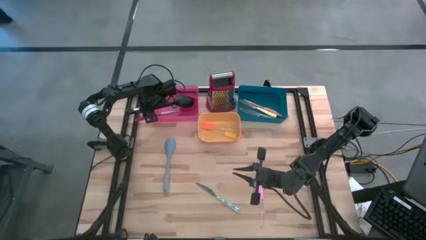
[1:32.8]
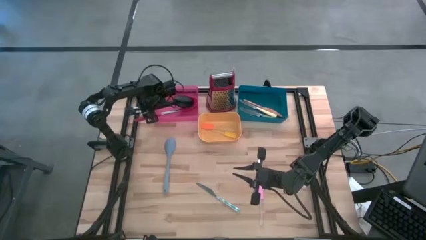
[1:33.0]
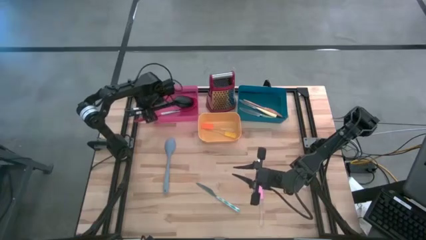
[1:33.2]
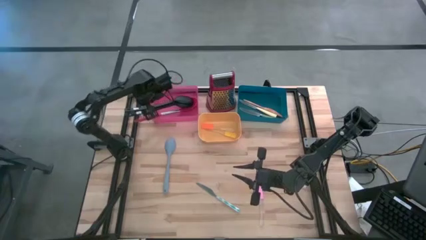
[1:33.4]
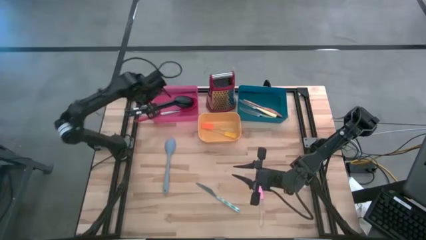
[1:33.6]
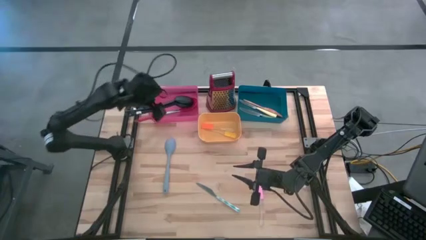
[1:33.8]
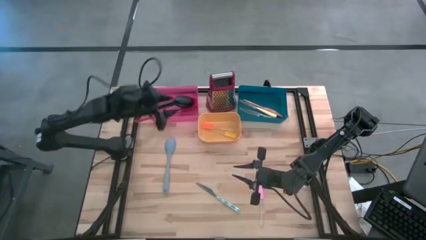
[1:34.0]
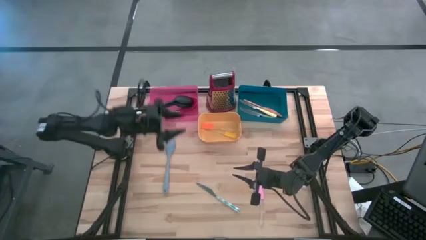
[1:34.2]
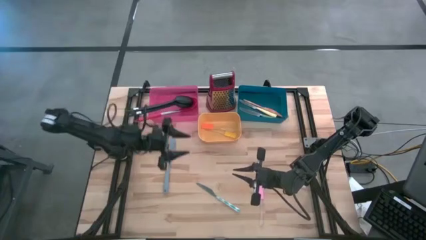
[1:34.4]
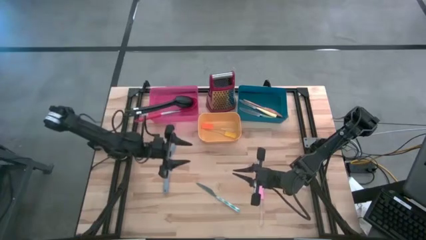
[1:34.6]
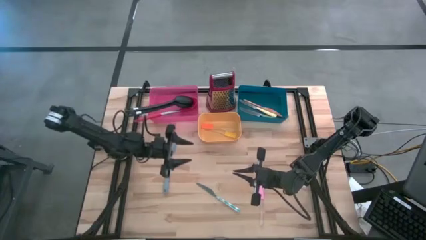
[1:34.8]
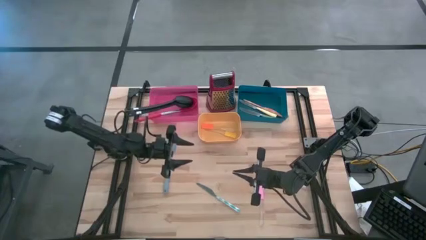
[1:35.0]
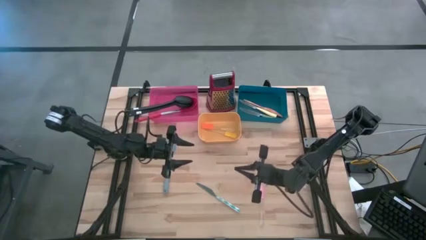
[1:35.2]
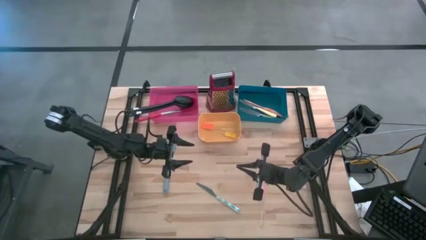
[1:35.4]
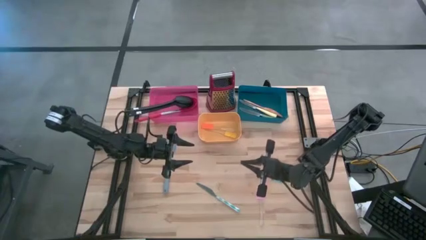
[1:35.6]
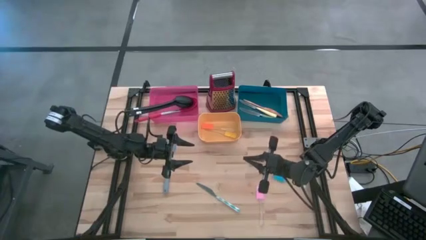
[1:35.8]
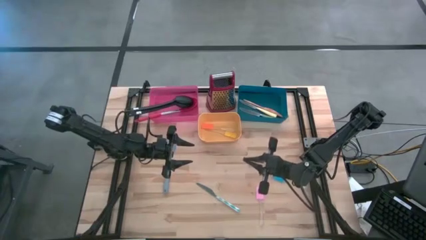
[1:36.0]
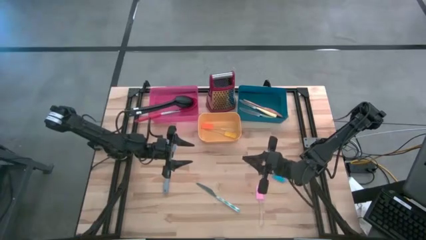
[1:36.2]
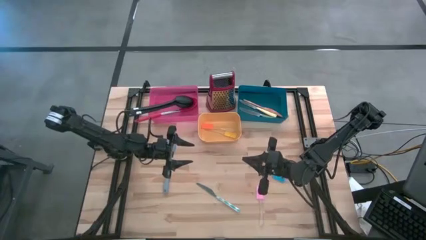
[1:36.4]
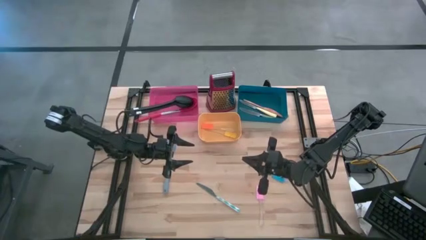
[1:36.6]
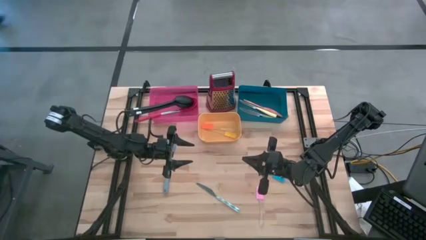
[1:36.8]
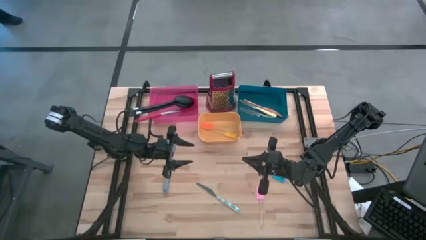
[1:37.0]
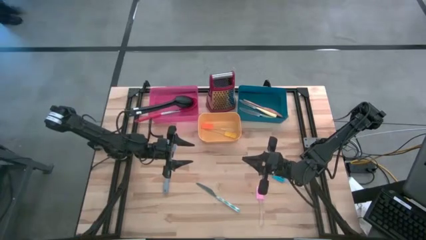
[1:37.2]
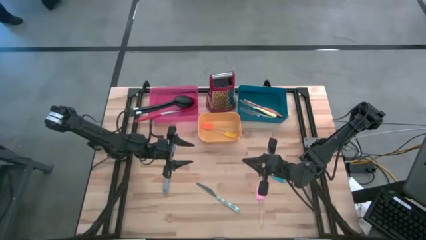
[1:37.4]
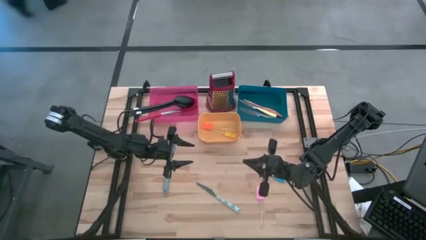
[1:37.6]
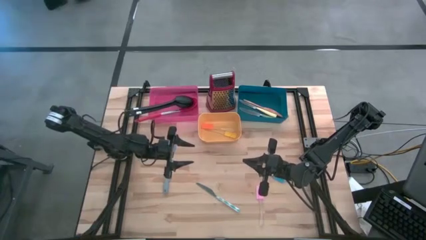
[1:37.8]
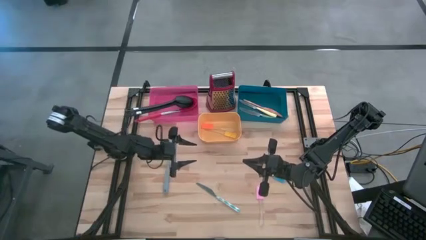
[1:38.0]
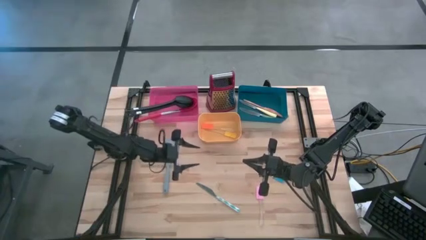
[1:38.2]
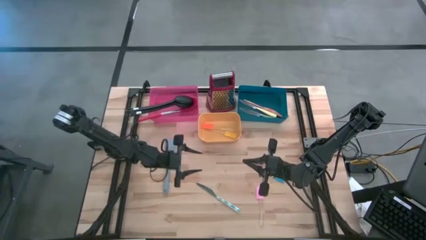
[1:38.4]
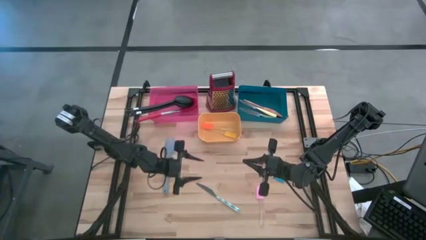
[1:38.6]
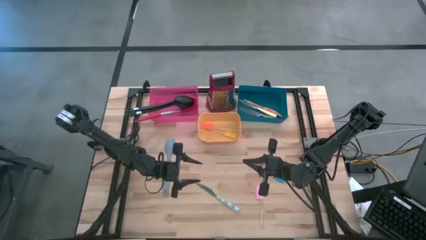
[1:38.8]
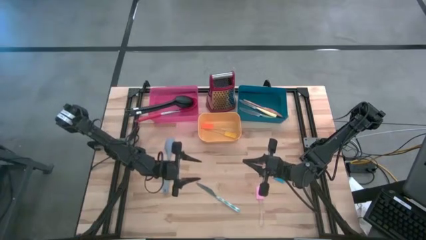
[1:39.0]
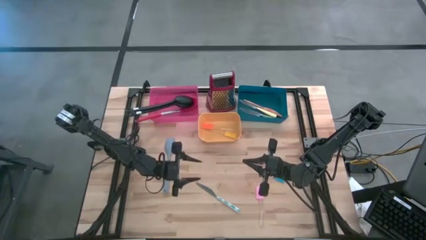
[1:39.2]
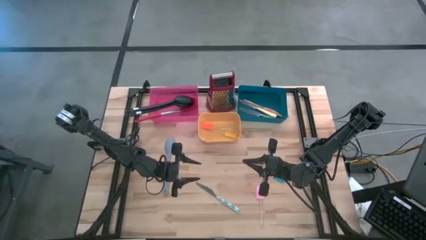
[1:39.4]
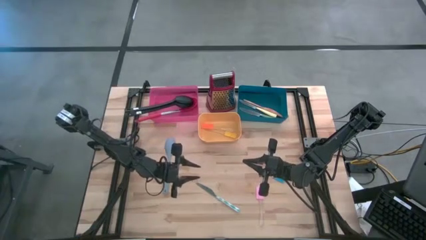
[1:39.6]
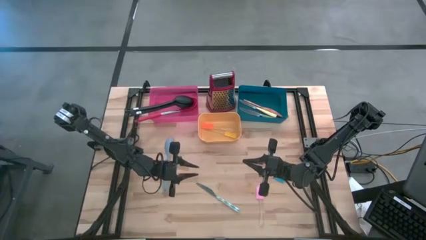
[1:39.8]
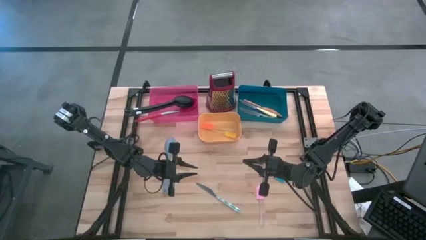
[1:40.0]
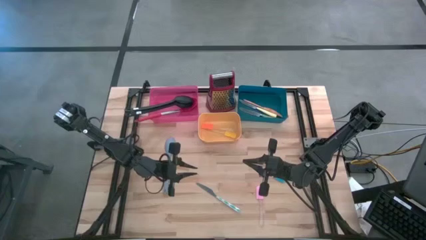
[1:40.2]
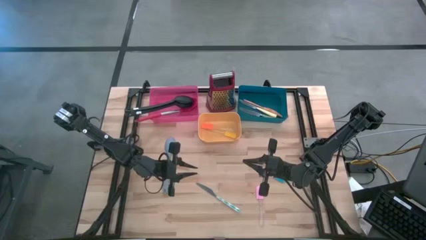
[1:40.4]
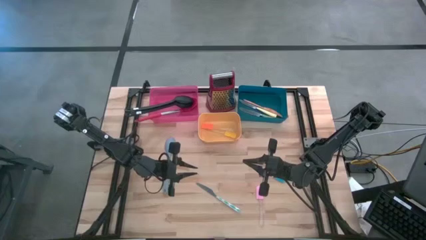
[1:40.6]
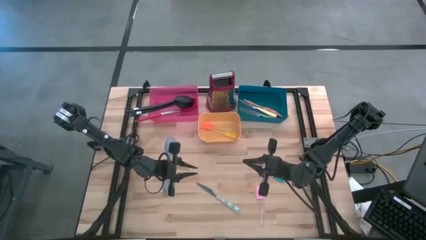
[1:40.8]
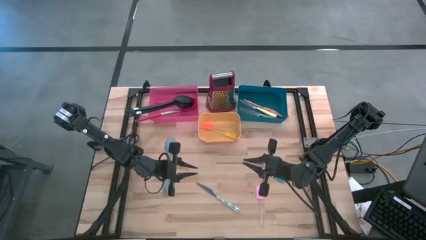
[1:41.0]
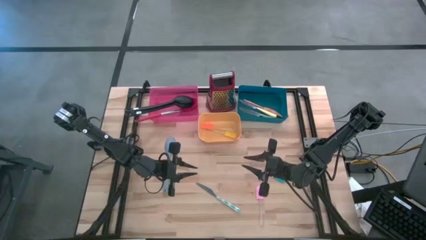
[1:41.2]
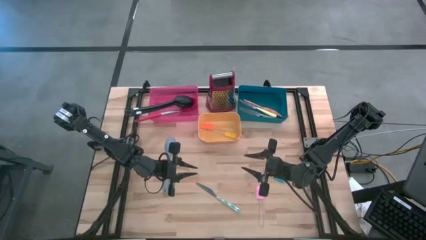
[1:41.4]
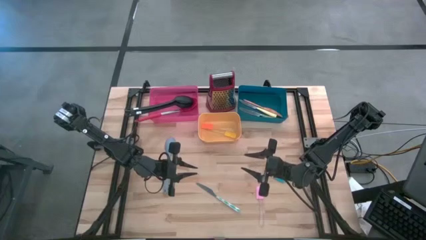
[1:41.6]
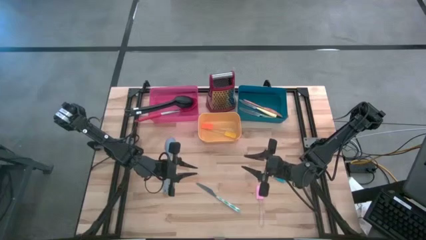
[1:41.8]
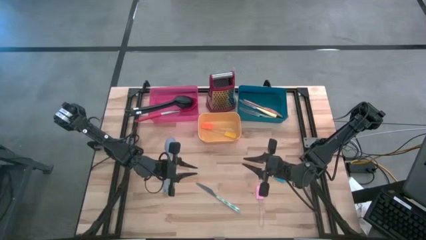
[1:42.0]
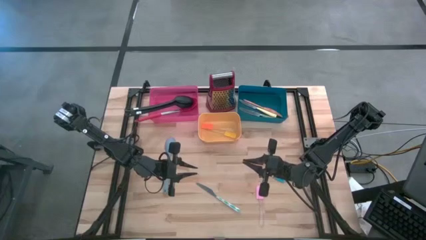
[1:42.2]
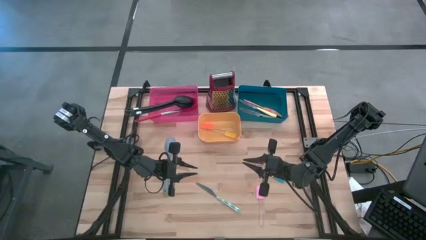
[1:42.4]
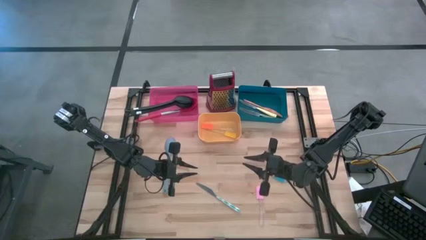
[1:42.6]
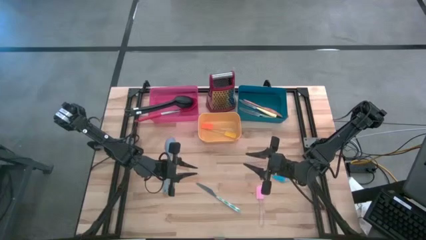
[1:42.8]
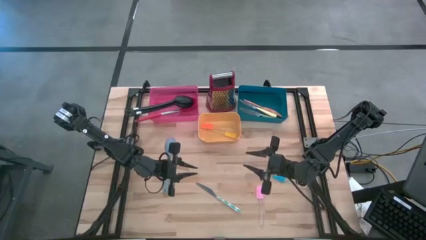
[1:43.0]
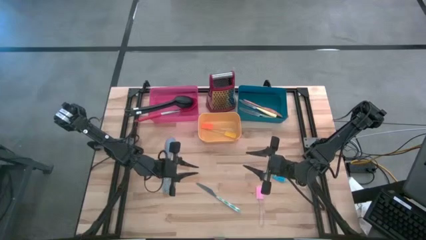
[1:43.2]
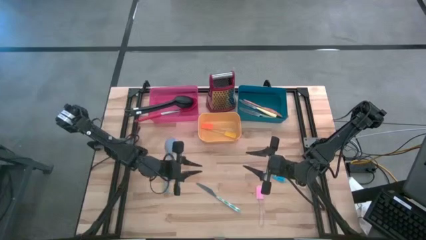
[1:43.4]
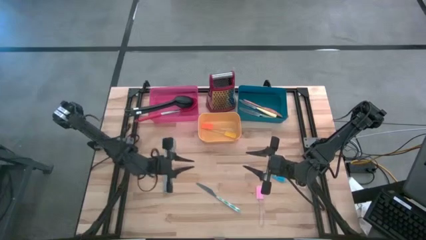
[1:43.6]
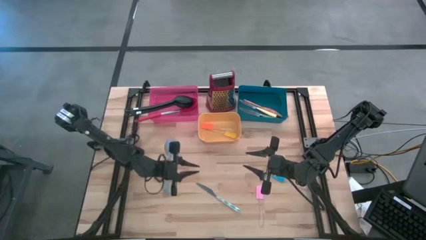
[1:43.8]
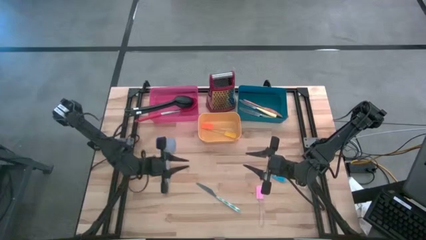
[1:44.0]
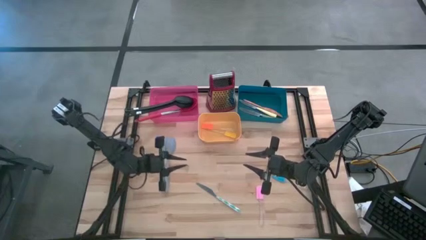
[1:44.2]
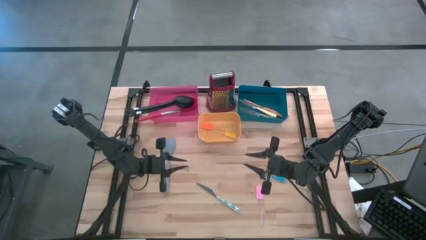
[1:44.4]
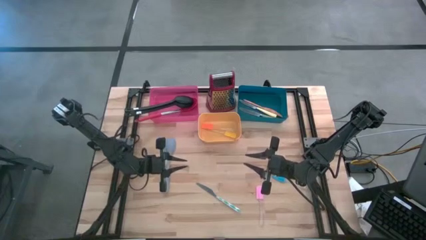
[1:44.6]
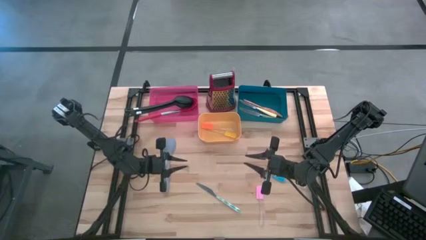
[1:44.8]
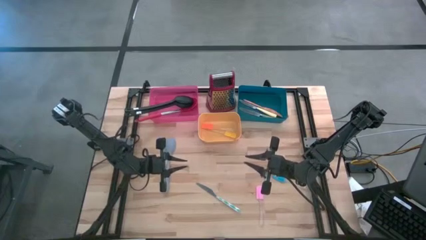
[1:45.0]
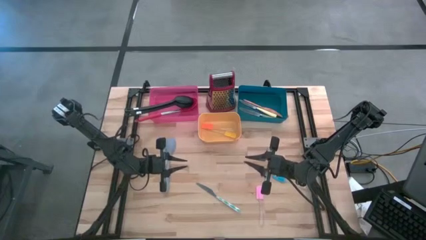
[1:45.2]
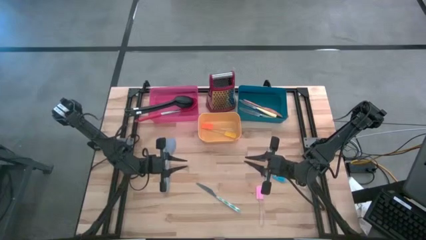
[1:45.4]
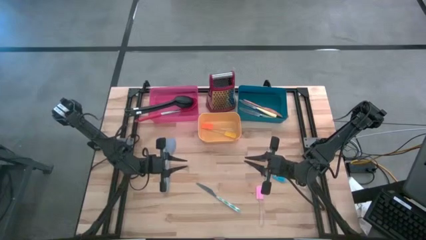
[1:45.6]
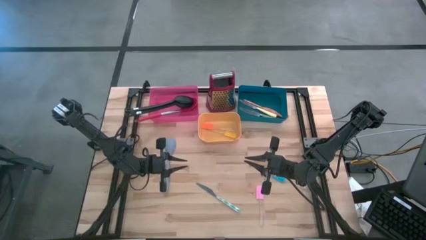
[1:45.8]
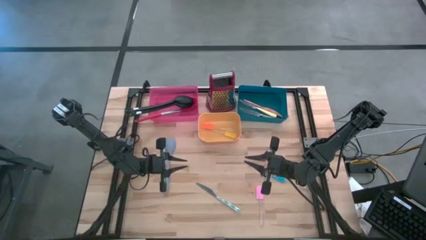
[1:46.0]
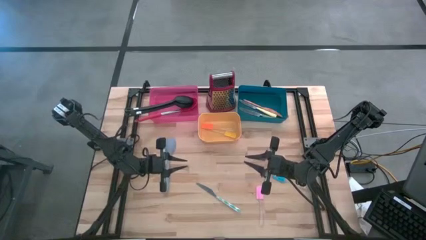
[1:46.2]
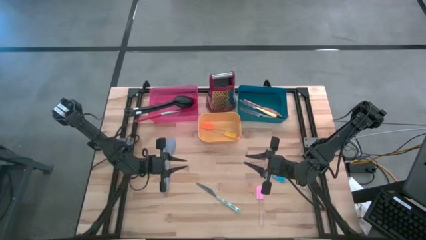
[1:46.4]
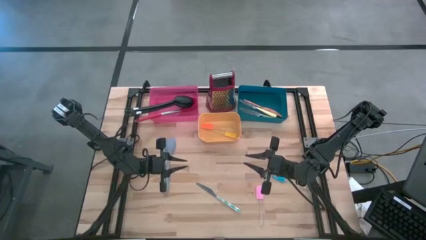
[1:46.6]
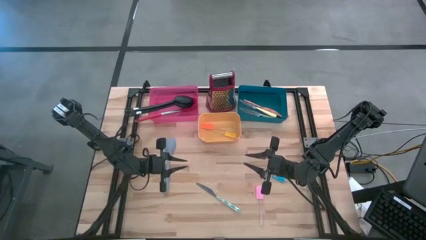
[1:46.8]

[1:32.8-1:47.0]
Task: Pick & Place Kitchen Items
Put the light blue serving spoon into the red bin
